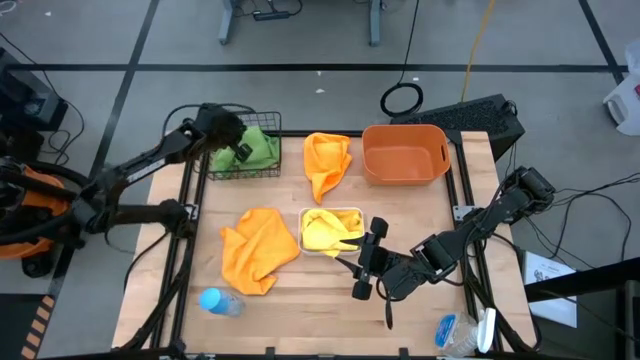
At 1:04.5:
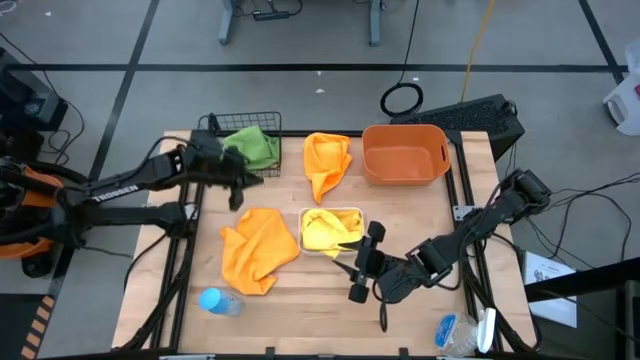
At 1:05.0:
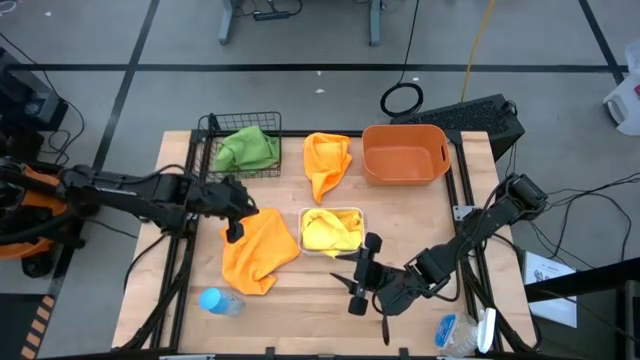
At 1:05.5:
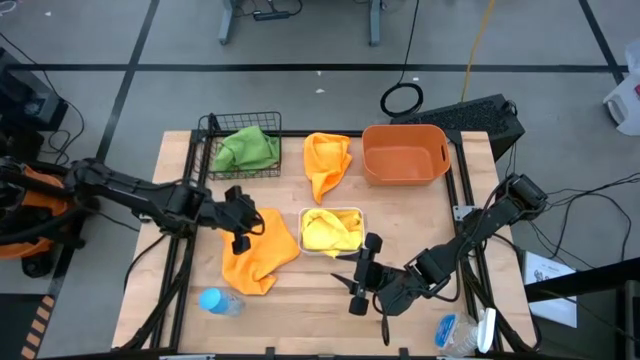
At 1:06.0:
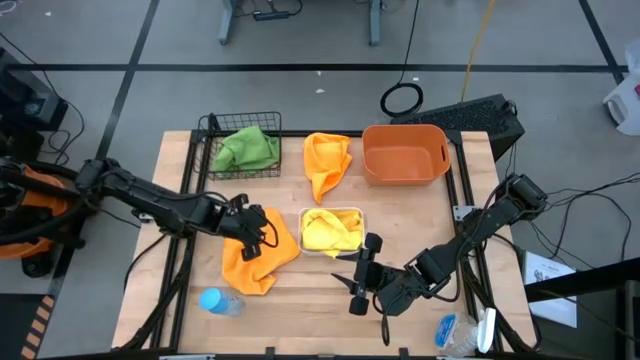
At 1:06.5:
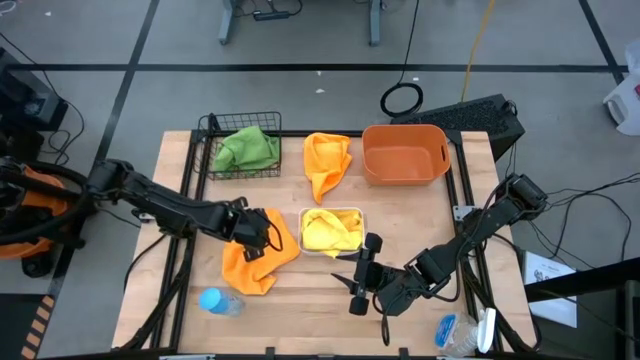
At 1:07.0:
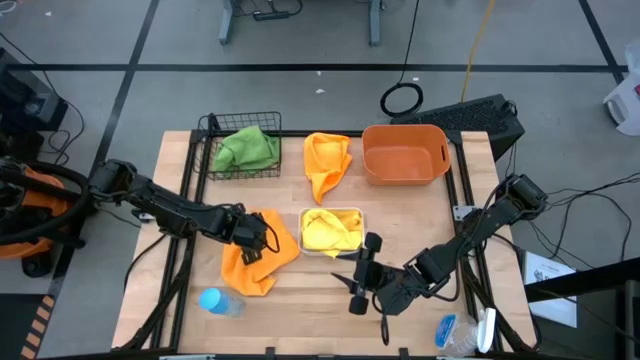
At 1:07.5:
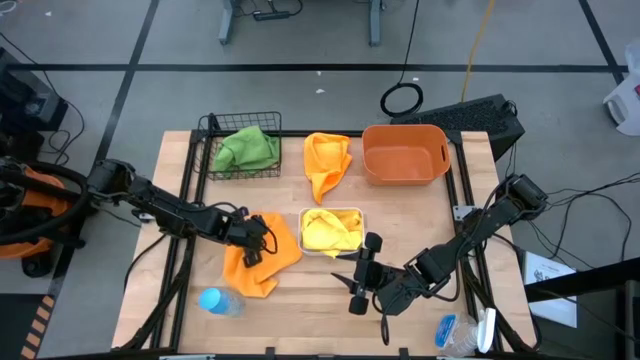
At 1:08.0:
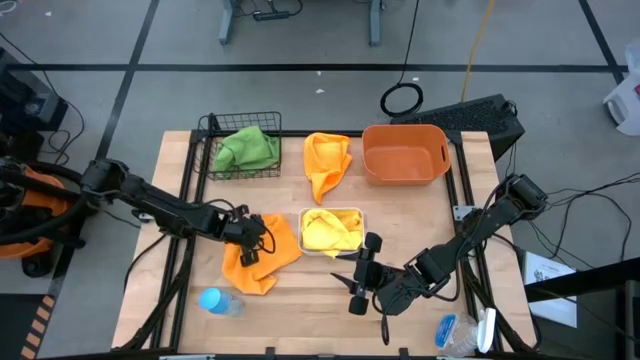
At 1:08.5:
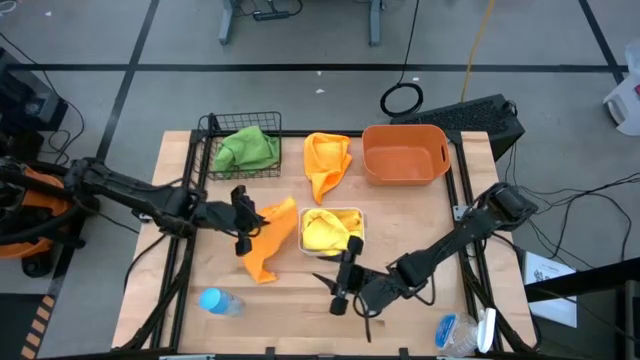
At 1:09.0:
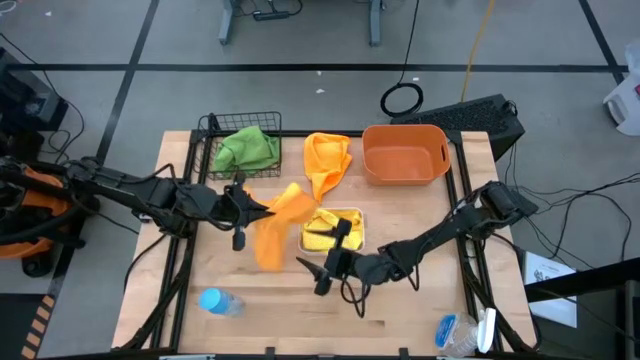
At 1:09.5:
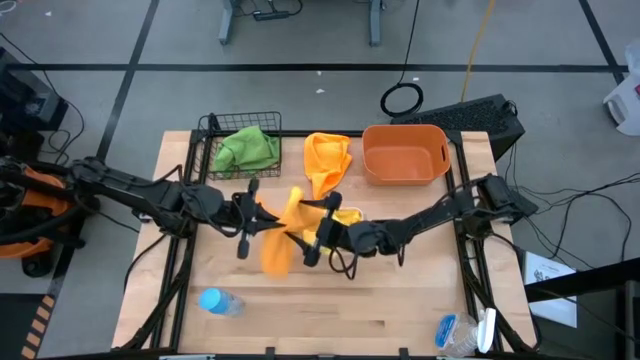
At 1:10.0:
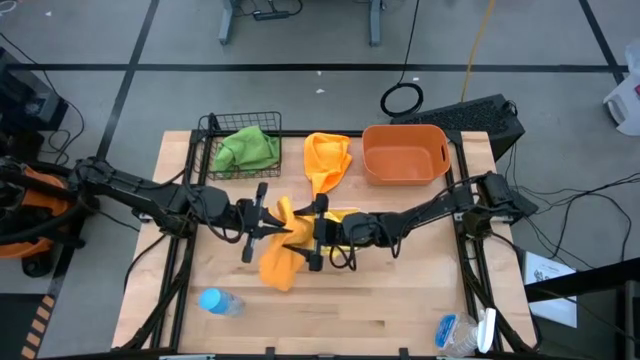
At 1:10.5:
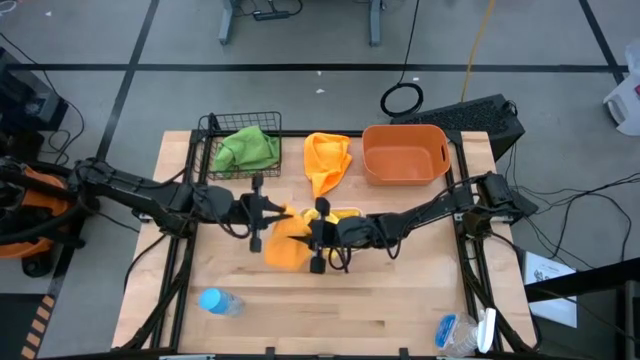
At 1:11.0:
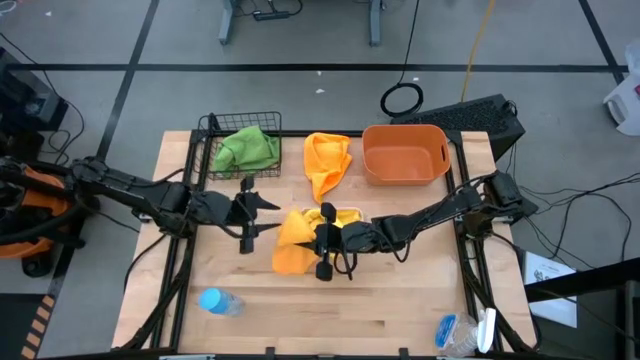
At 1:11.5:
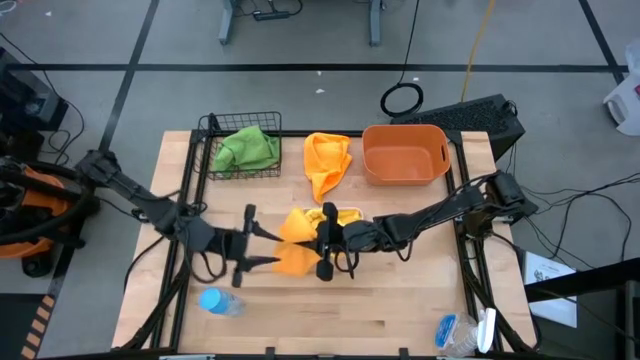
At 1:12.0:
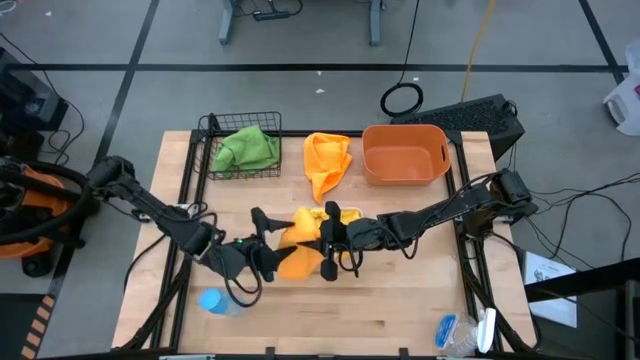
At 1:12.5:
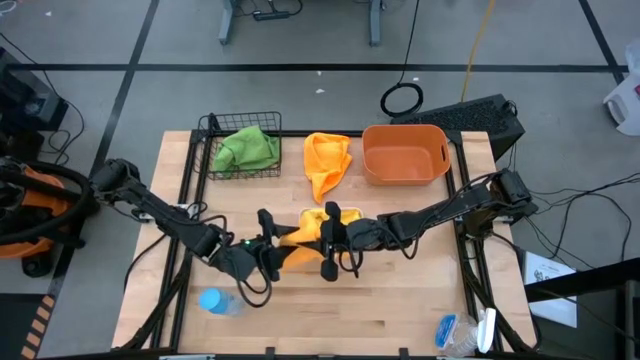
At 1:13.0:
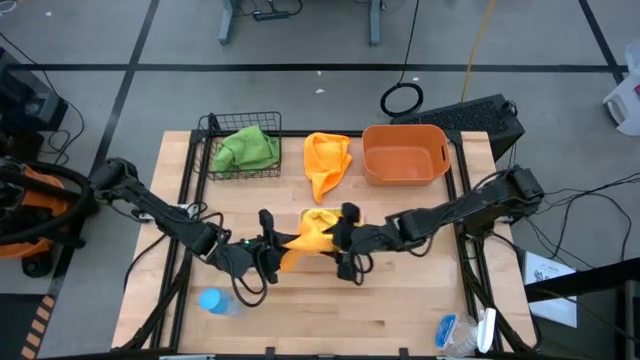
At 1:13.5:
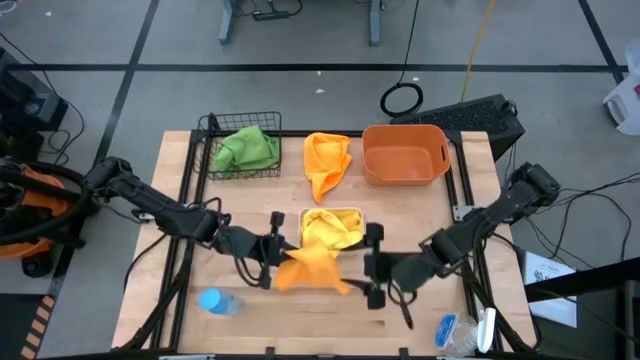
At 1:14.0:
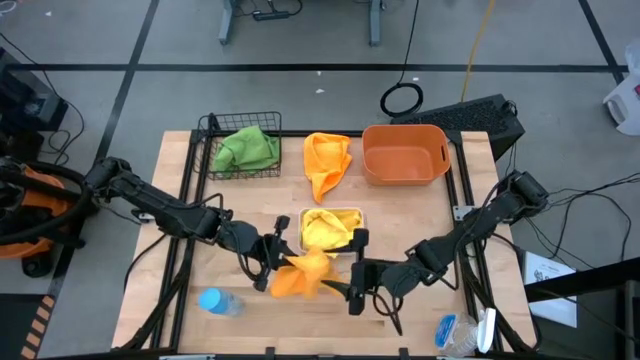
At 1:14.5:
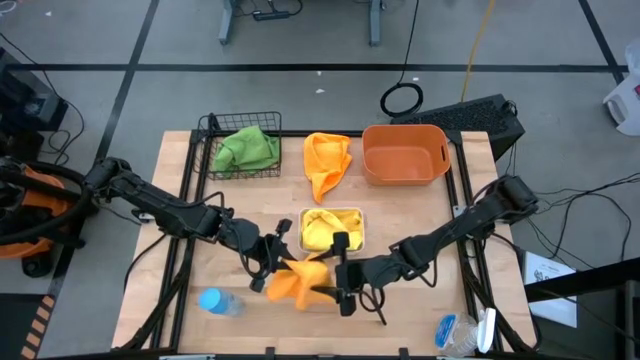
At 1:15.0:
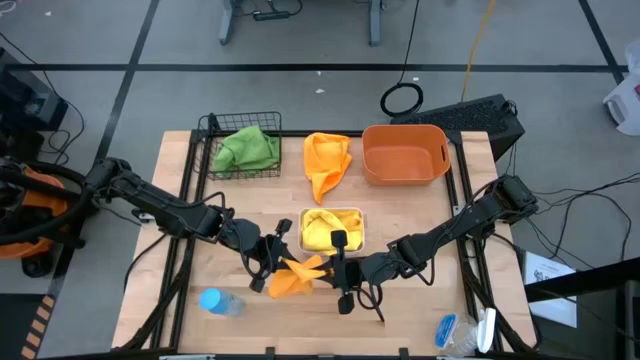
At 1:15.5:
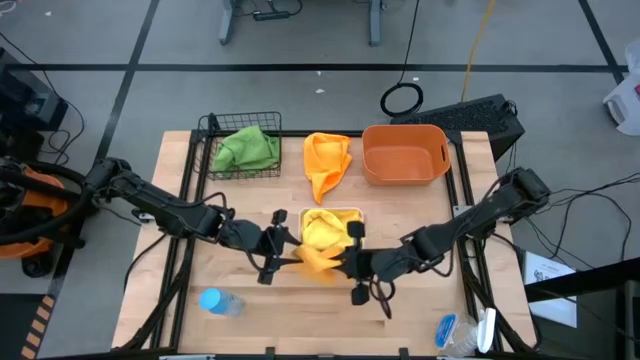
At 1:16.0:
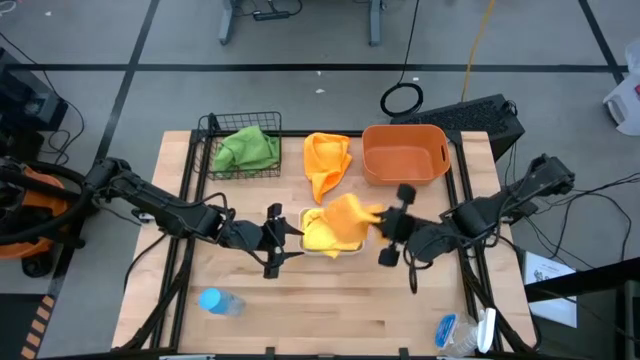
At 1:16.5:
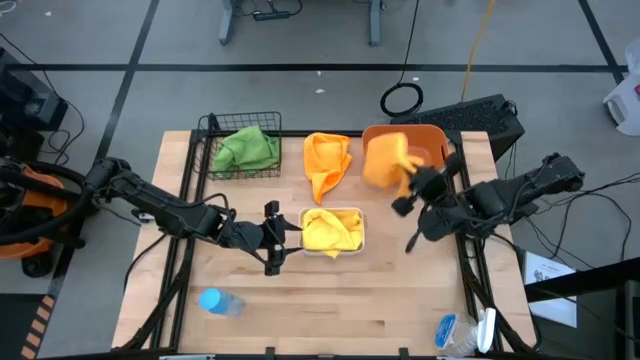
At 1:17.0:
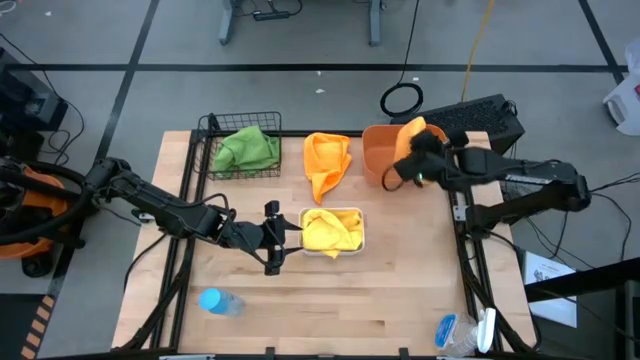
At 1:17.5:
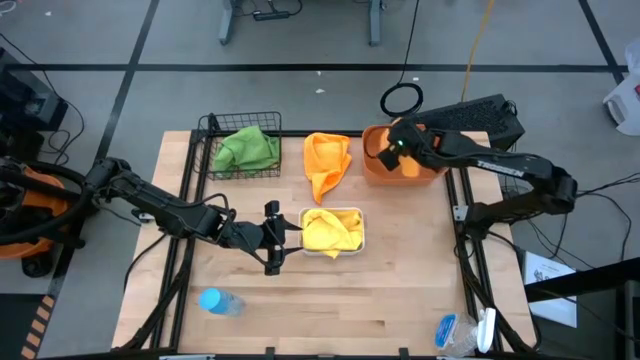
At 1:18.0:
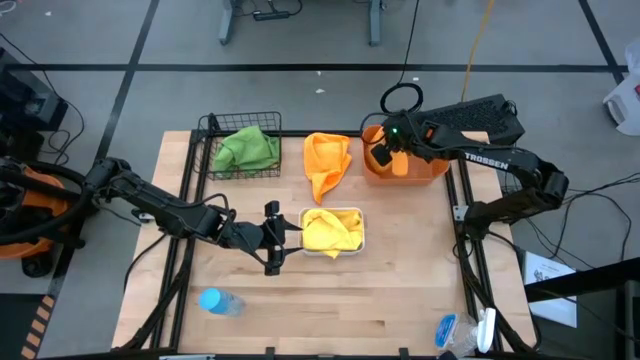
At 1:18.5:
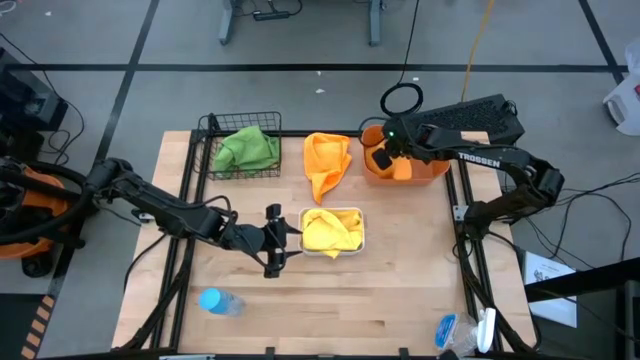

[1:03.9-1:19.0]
Task: Sort microfiber towel by color & place in baskets
Put the bottom orange microfiber towel into the orange bin

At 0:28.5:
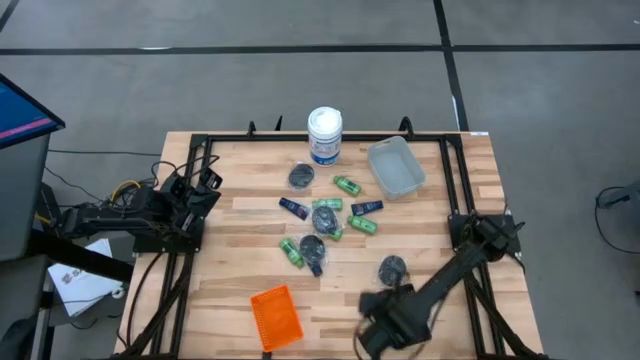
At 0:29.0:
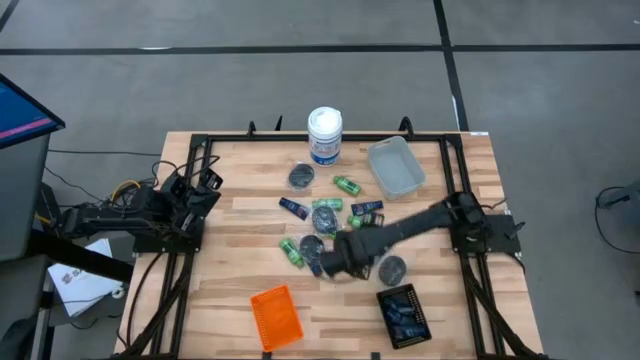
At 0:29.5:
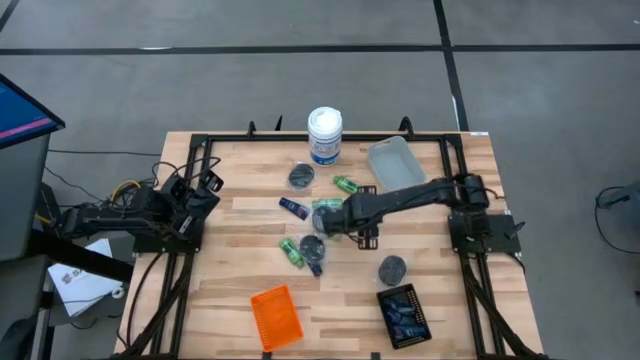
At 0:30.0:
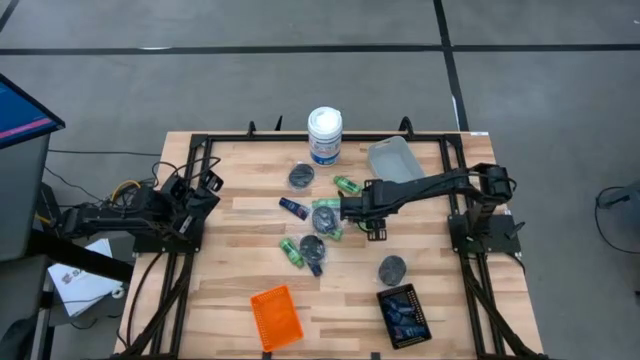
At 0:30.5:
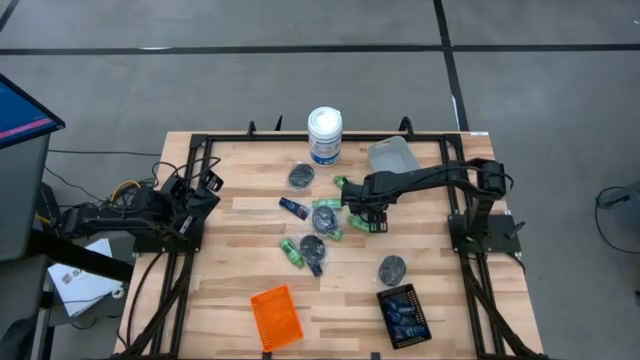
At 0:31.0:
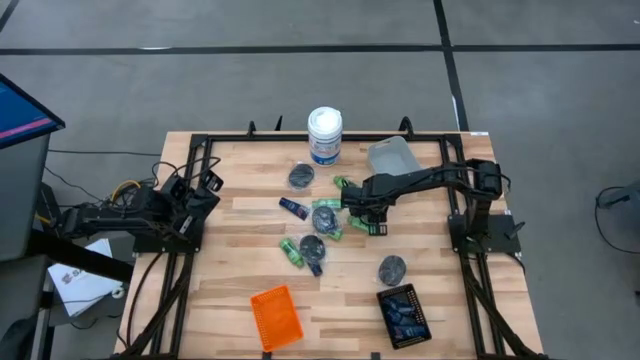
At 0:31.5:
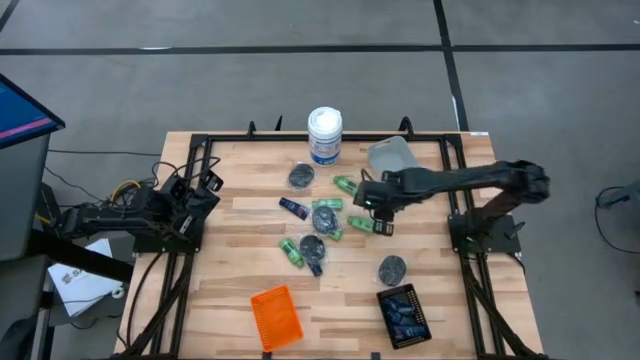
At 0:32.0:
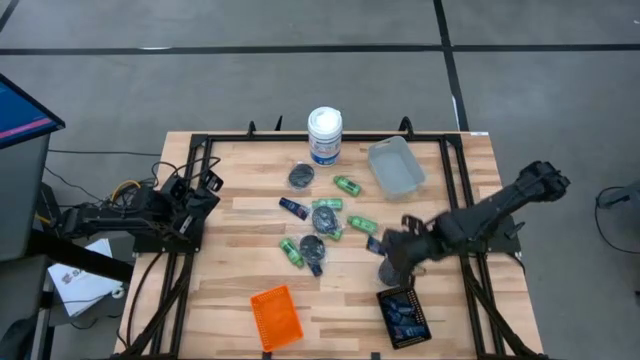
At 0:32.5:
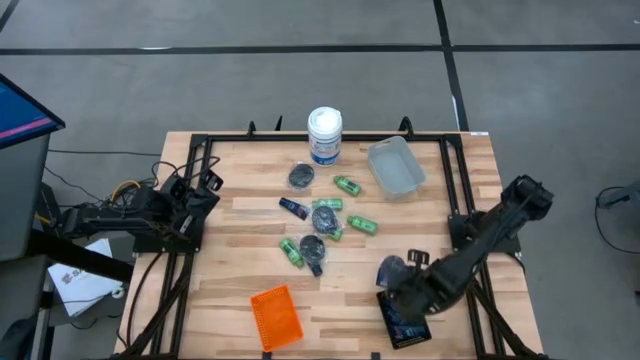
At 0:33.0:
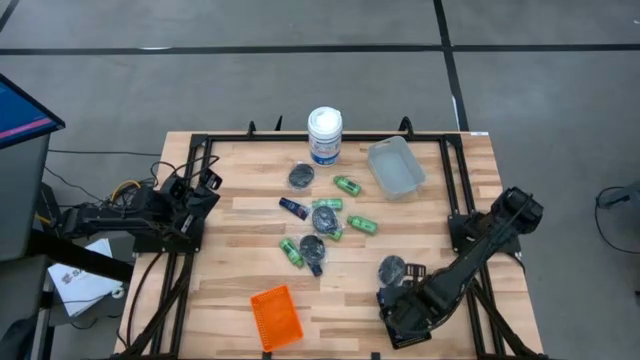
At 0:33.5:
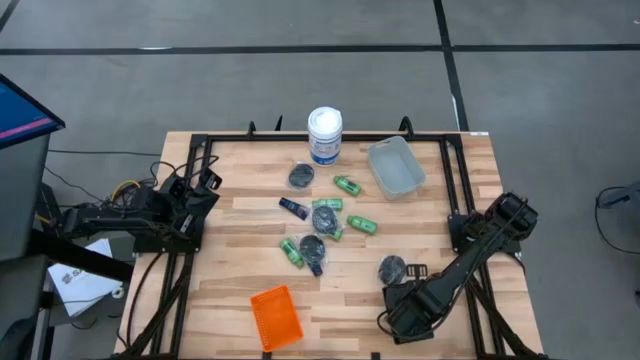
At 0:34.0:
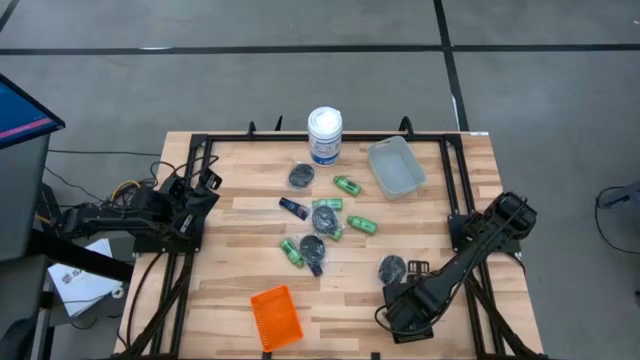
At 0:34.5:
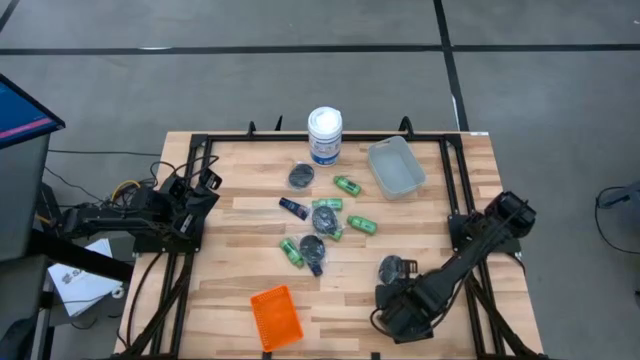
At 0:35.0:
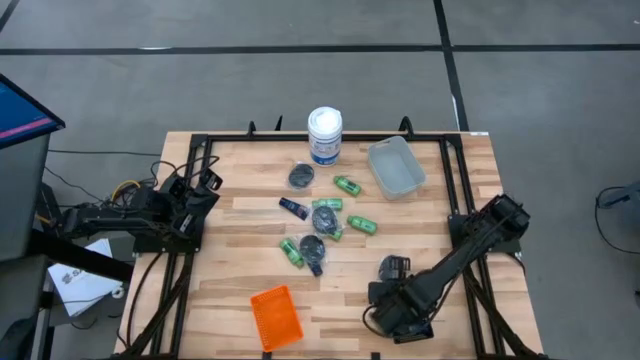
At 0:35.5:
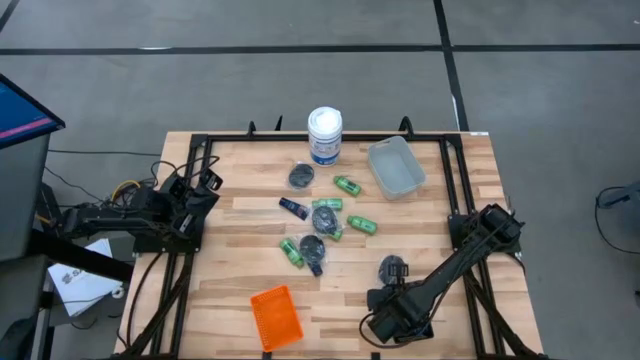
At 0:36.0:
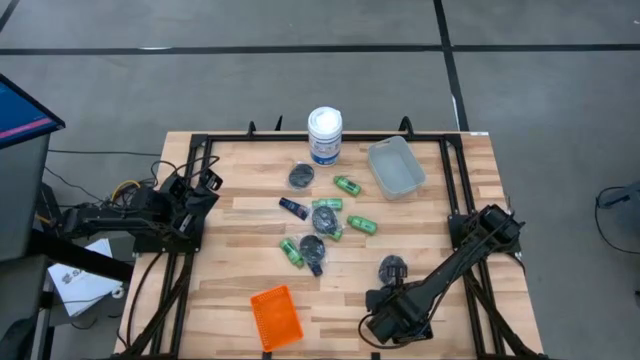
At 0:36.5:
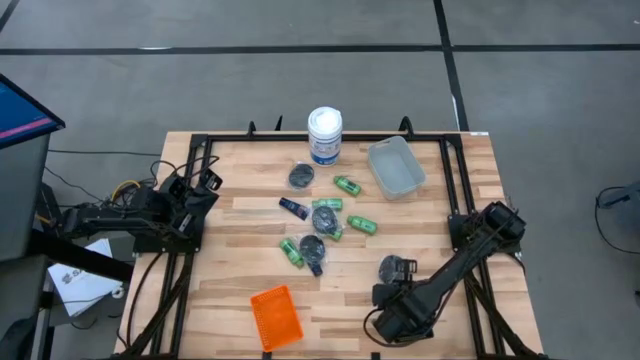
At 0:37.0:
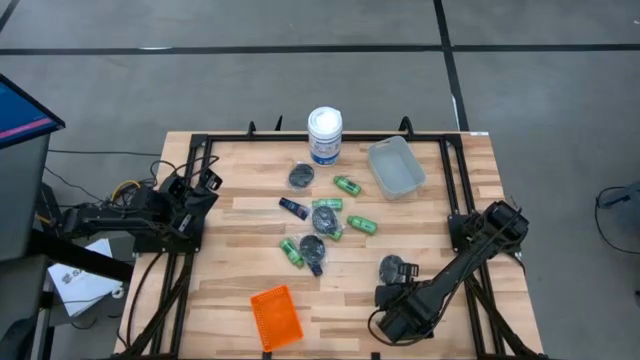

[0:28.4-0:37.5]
Task: Pick & Place Travel size toiletries
Put the blue shave cream into the black basket
